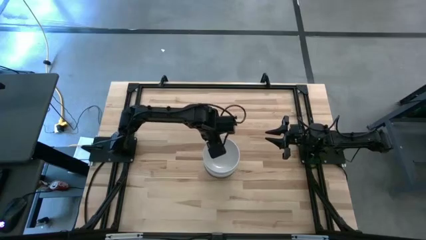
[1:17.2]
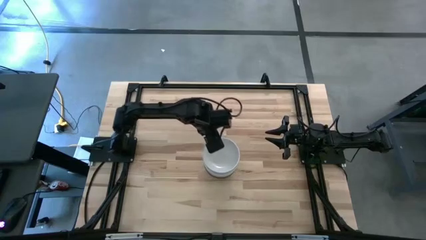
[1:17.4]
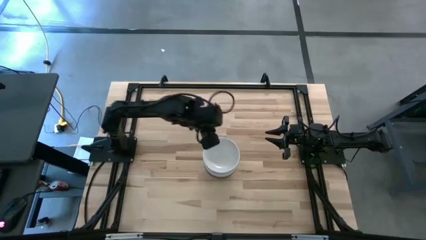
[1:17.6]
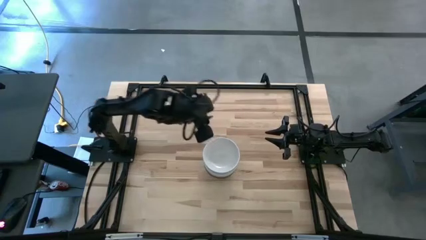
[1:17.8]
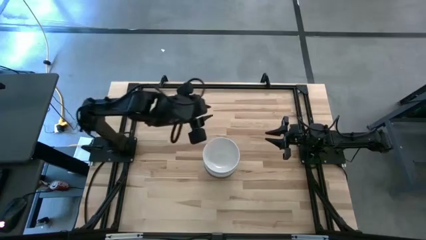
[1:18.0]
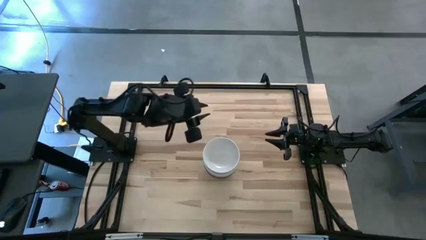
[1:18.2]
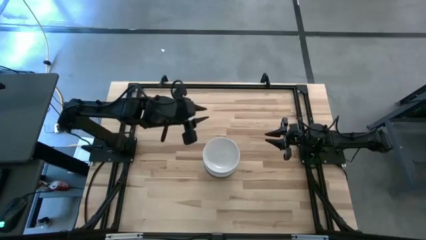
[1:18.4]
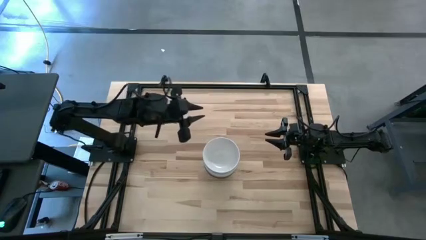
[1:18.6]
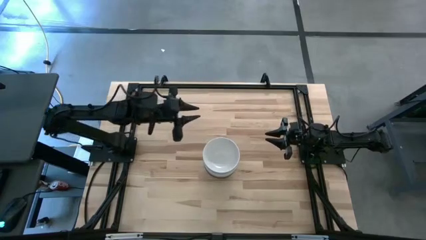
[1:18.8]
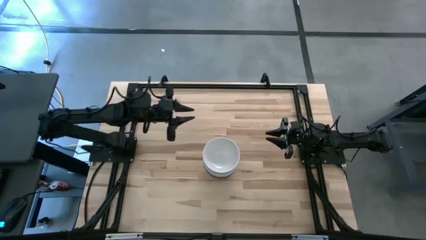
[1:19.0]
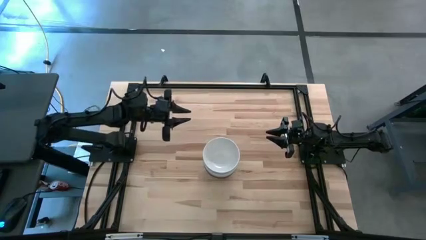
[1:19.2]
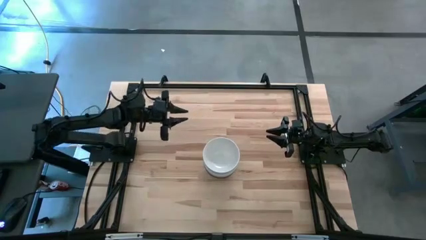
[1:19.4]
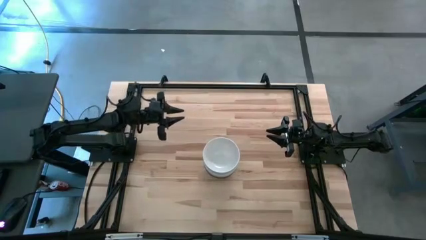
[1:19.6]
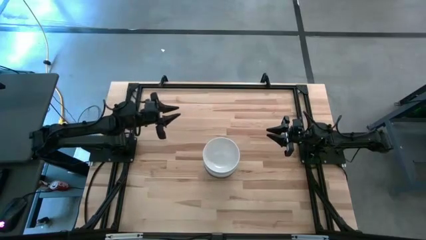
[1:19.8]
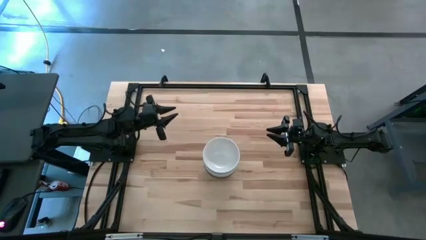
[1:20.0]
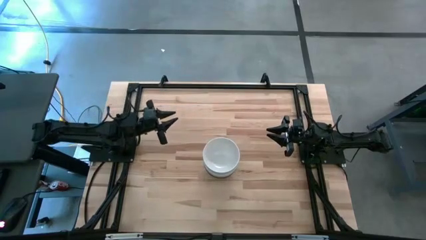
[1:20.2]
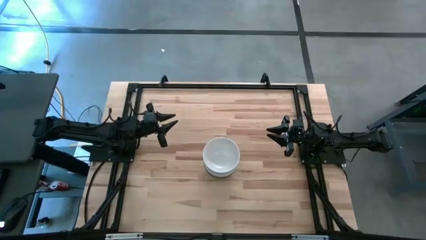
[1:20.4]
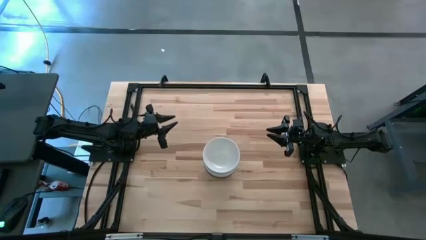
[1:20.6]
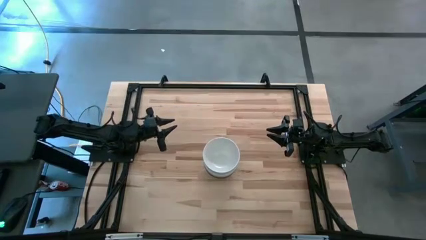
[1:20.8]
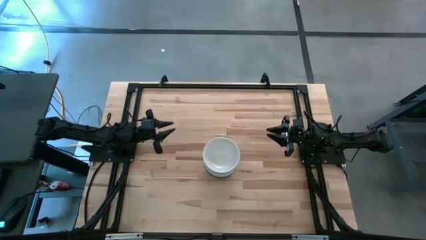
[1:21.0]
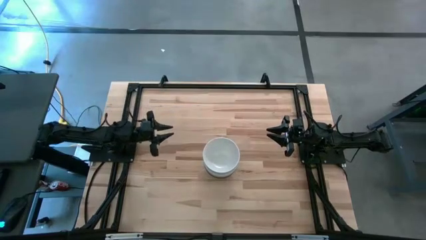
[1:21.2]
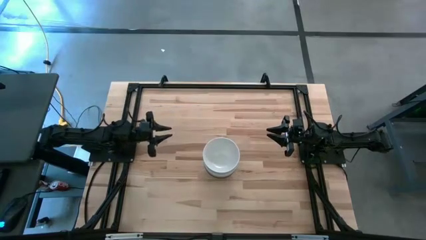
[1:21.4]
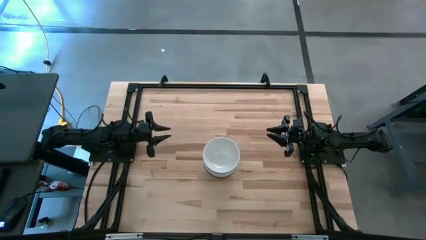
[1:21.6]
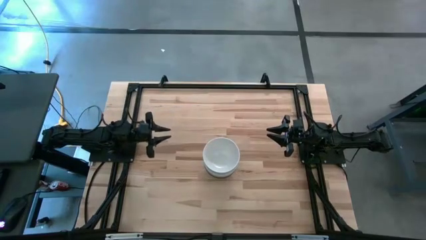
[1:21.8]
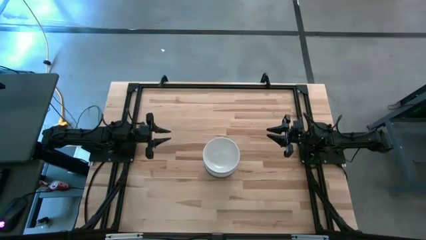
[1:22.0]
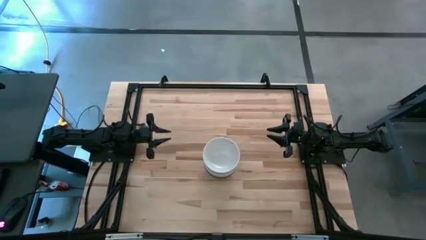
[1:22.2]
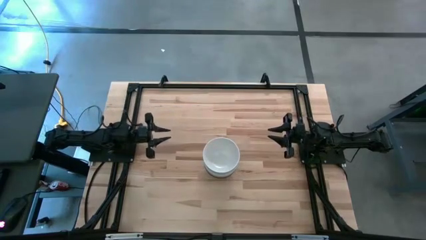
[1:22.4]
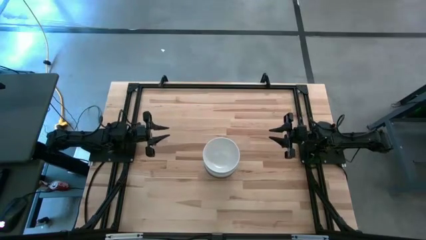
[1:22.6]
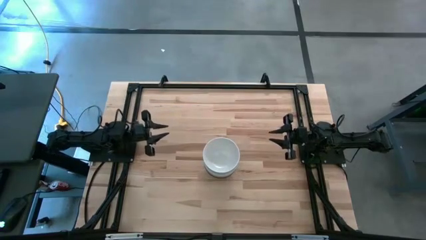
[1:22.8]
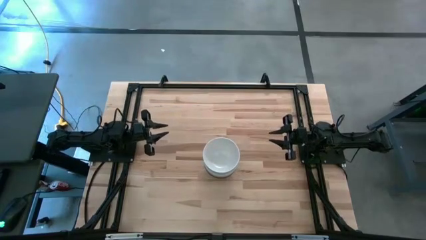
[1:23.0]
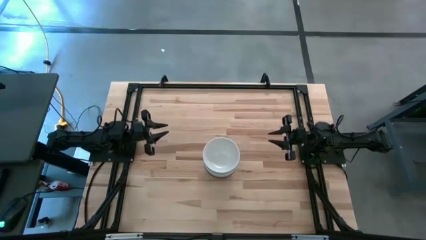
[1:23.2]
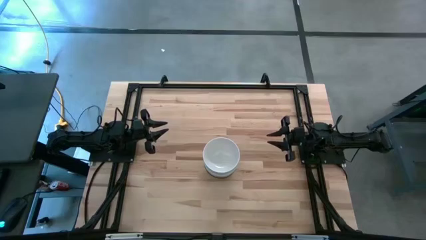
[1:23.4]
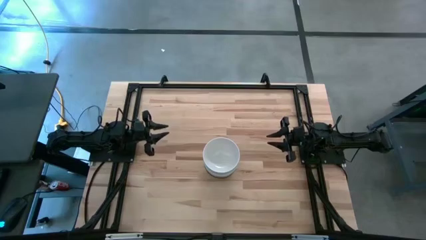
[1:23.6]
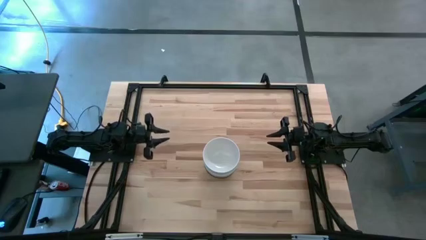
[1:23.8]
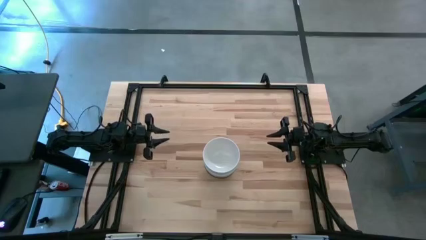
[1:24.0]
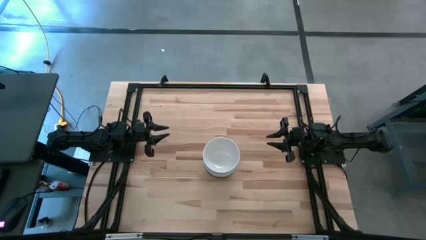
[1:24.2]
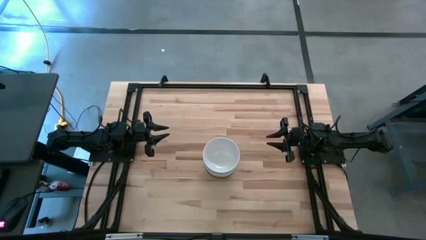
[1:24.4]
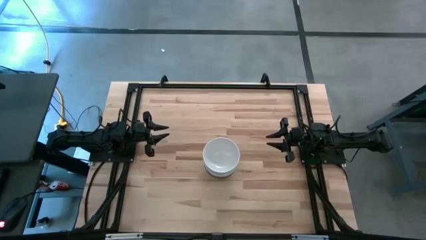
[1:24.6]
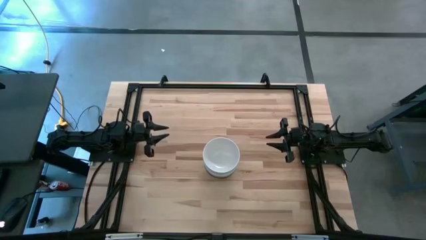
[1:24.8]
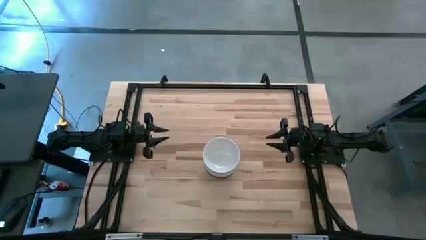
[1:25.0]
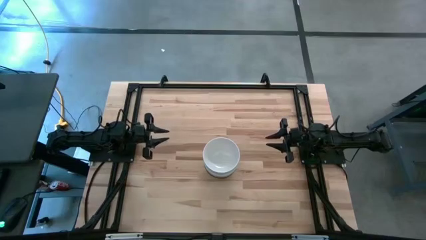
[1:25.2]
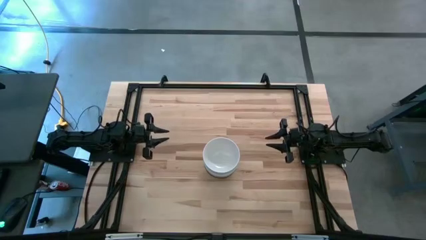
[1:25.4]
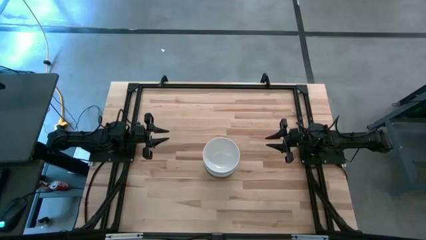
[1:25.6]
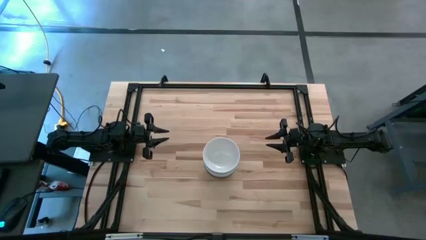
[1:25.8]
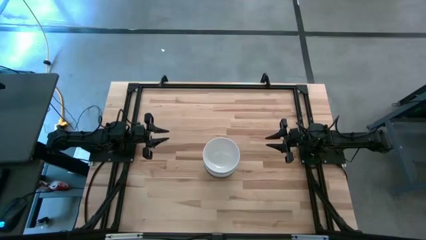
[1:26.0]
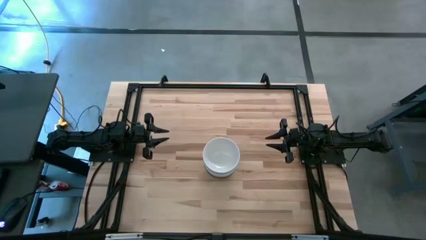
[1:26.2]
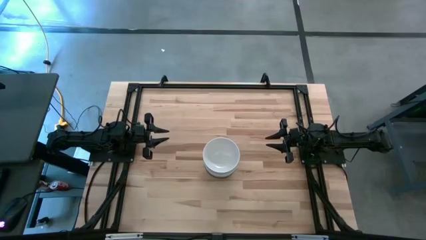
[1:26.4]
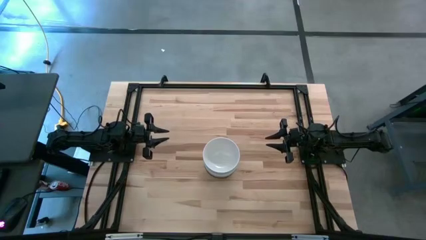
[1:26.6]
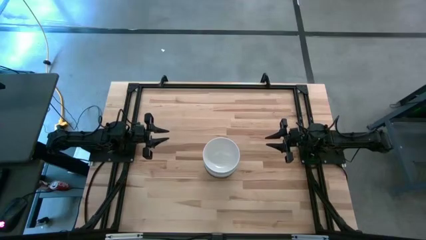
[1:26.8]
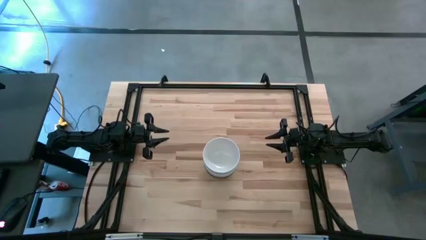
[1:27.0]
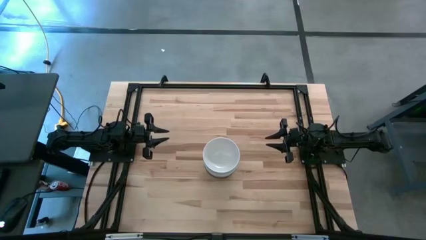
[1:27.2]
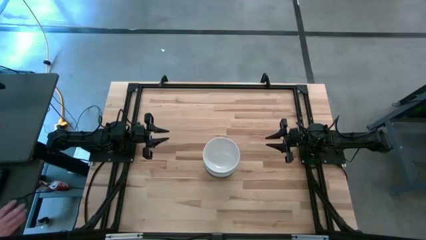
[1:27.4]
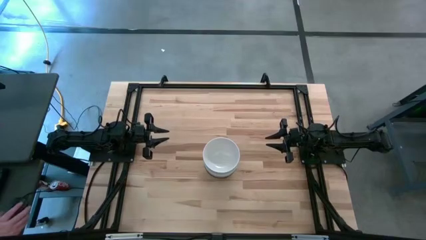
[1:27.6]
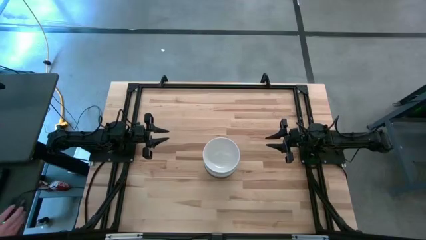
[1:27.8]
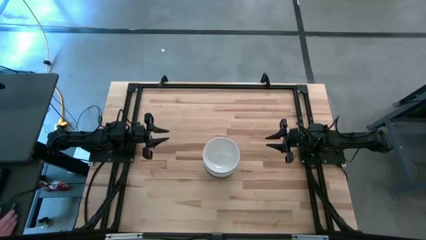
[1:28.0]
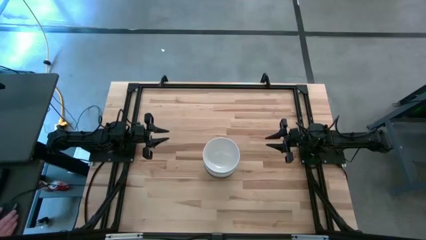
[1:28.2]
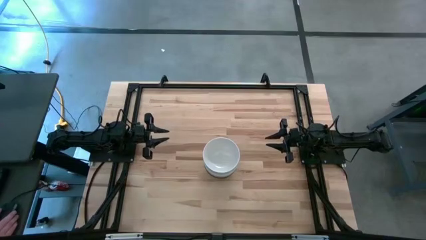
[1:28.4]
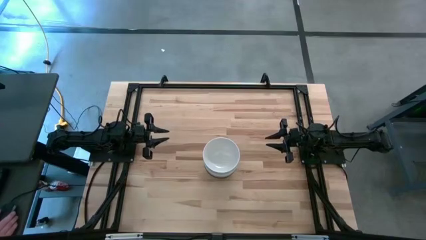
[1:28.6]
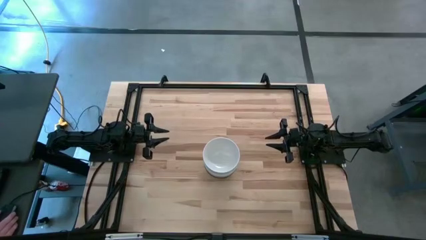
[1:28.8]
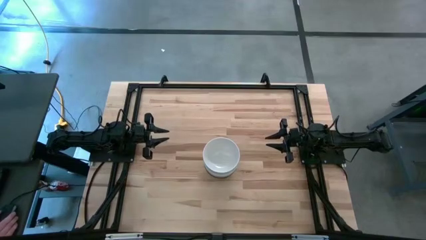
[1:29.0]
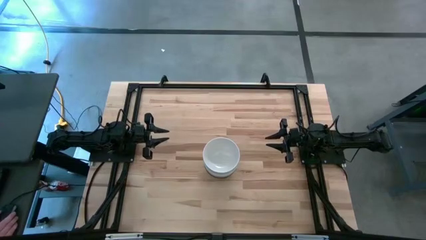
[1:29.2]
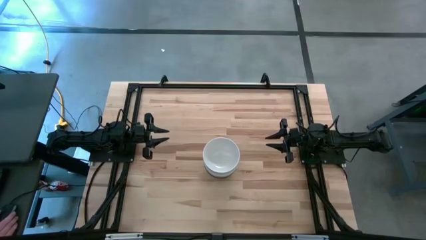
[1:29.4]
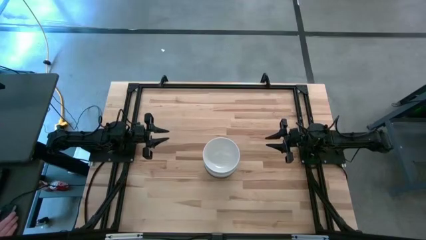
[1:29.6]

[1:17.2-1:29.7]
Task: Nest bowls inside each other
Return to Home Position

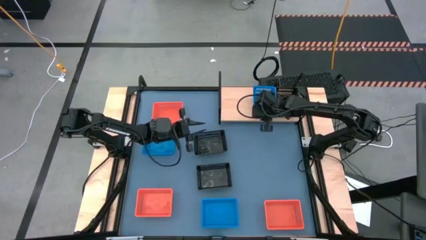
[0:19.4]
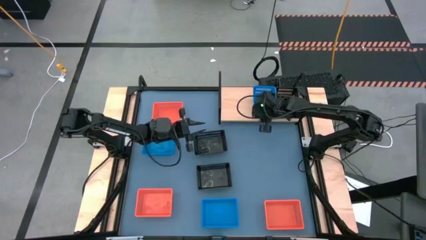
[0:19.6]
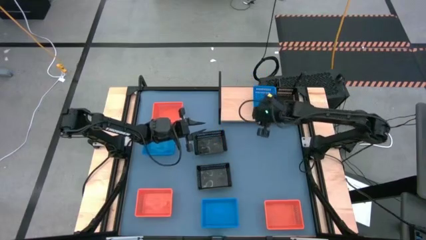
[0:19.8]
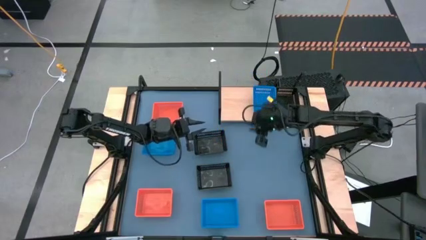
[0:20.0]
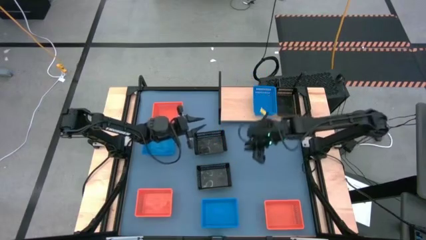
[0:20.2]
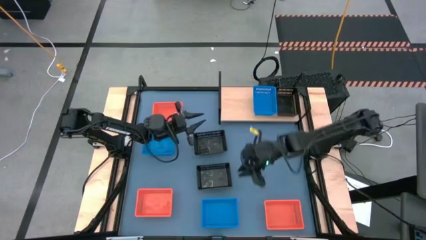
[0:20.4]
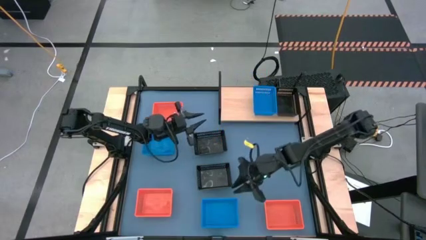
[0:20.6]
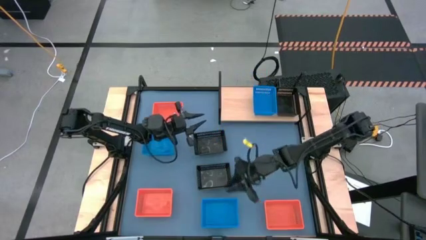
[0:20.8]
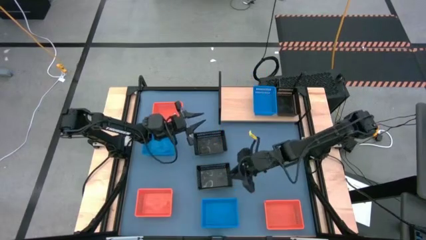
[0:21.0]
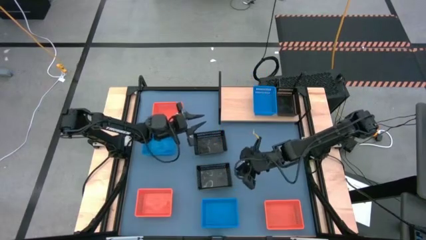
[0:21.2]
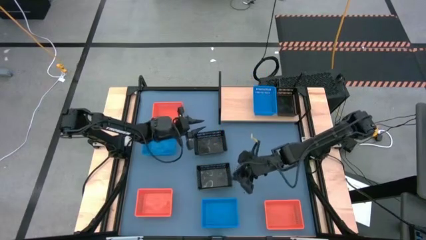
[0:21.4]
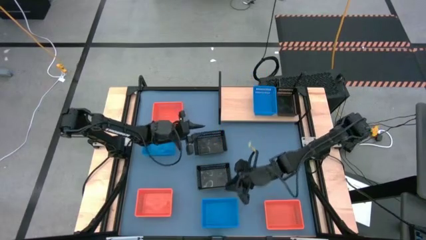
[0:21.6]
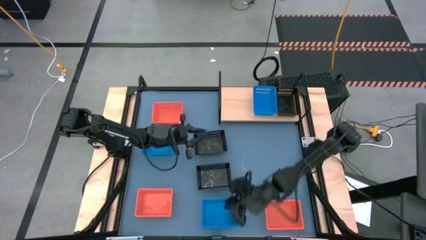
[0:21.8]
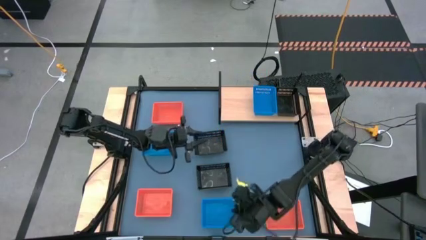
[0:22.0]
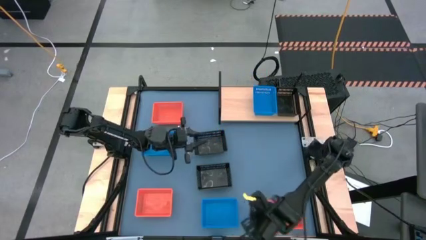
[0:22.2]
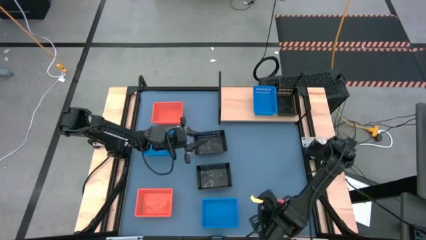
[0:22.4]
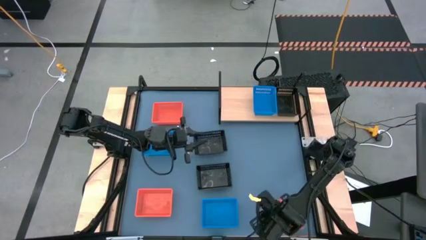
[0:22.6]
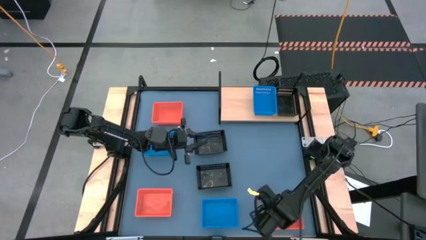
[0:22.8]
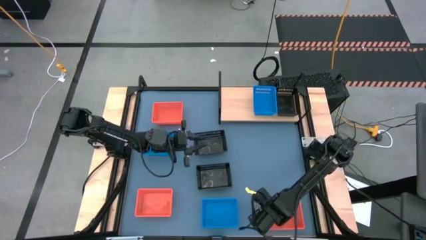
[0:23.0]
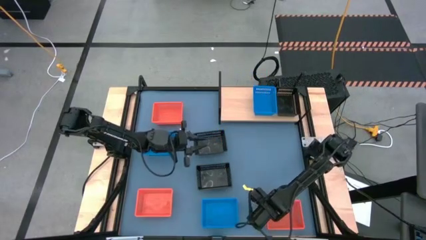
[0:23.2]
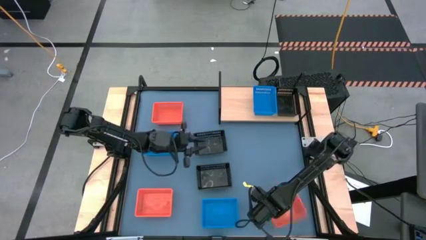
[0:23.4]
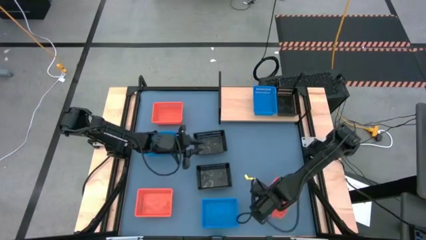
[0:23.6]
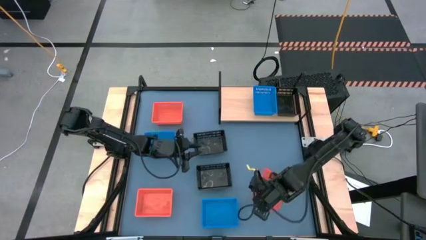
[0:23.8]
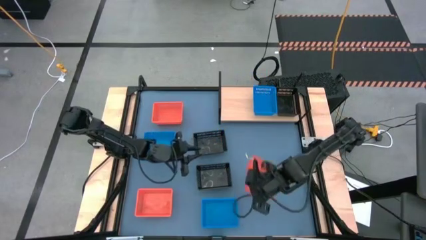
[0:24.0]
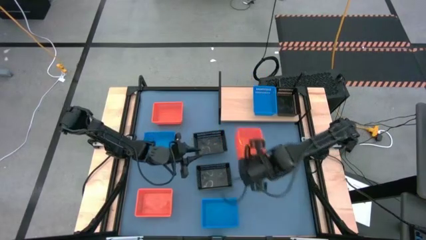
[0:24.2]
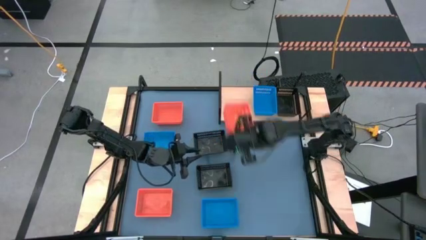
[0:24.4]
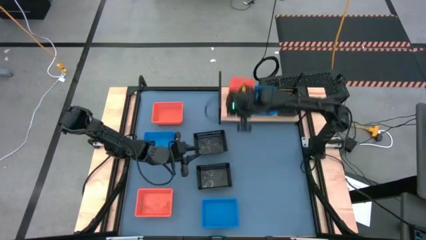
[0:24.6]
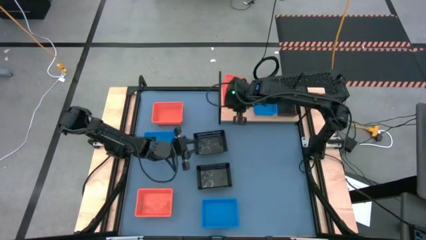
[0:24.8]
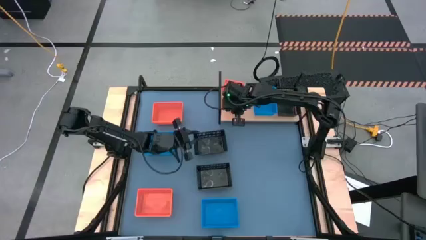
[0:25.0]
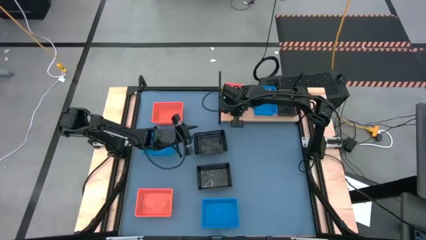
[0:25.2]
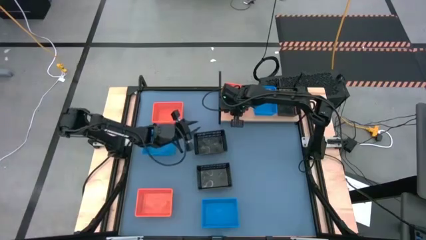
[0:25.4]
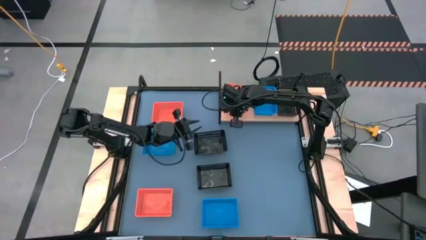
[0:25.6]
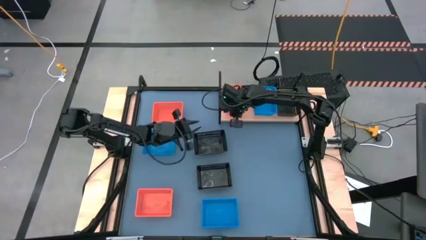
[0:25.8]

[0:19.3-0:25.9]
Task: Stack baskets on shelf by color
Put the bottom right orange basket on the shelf
